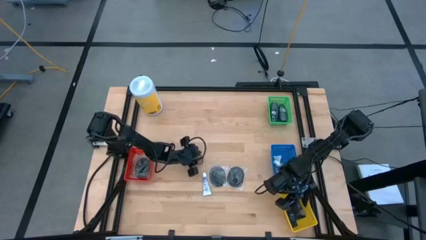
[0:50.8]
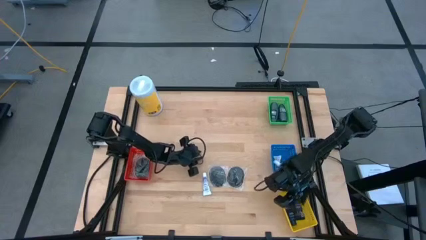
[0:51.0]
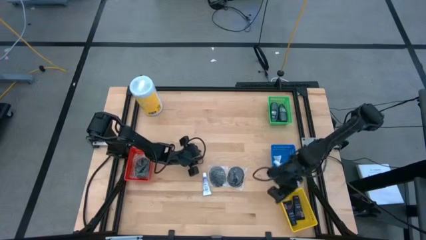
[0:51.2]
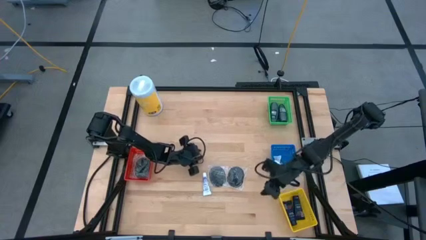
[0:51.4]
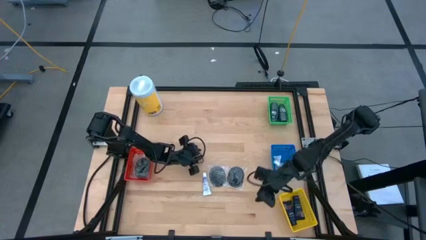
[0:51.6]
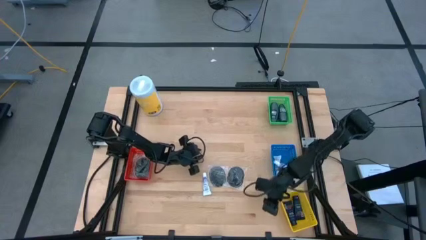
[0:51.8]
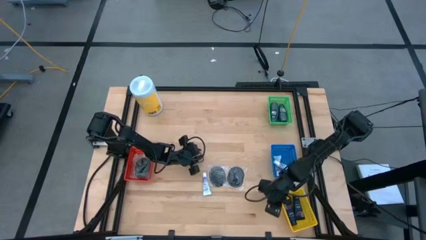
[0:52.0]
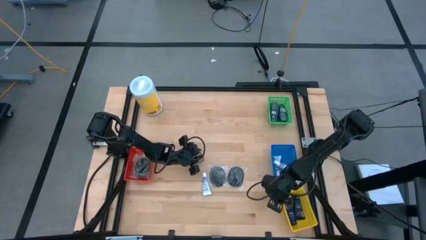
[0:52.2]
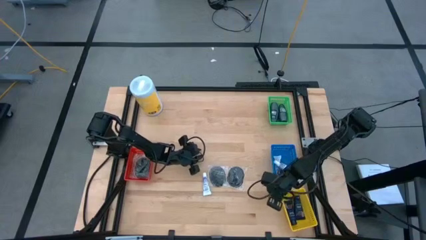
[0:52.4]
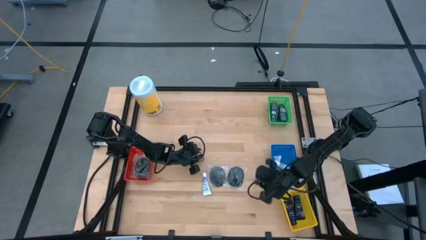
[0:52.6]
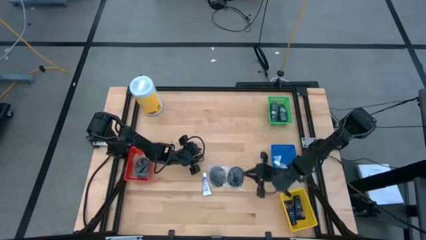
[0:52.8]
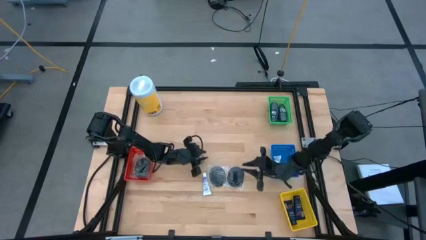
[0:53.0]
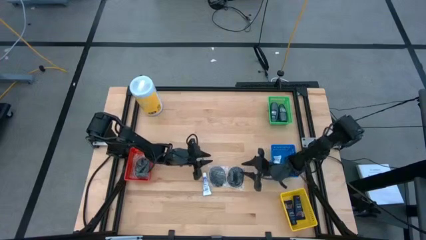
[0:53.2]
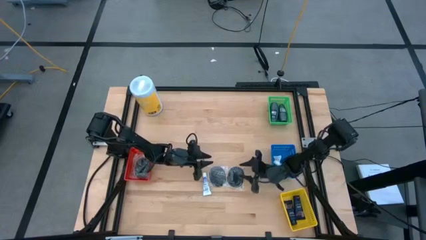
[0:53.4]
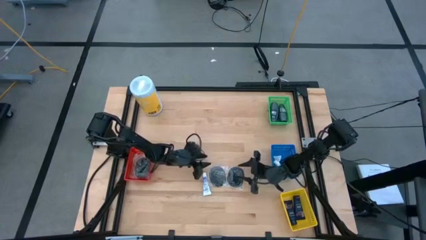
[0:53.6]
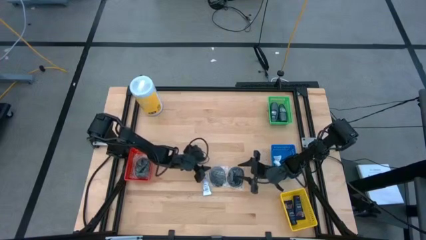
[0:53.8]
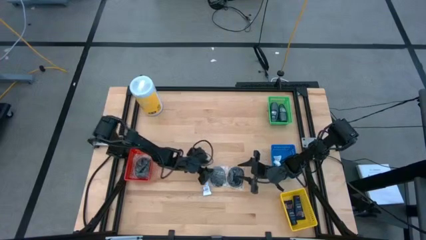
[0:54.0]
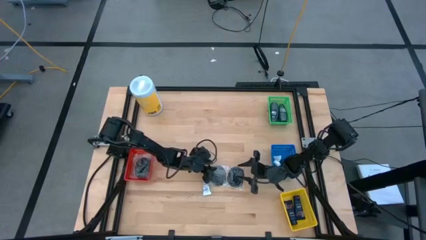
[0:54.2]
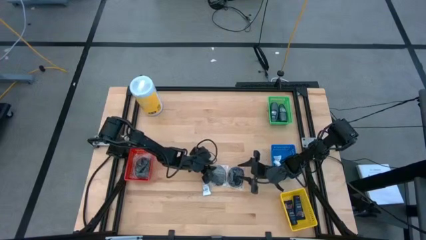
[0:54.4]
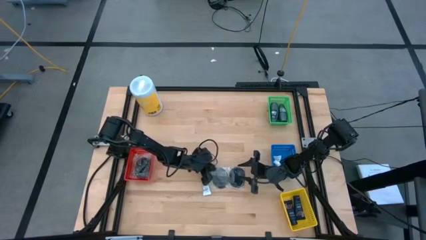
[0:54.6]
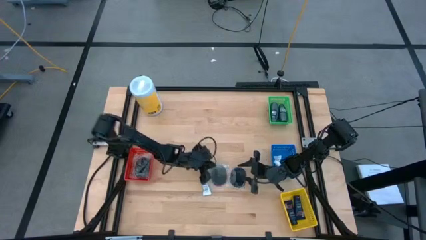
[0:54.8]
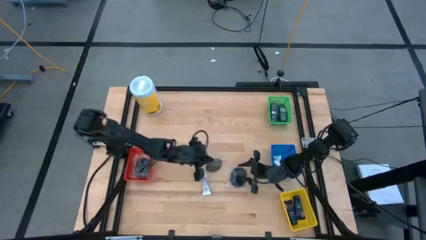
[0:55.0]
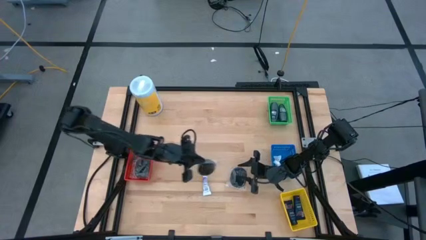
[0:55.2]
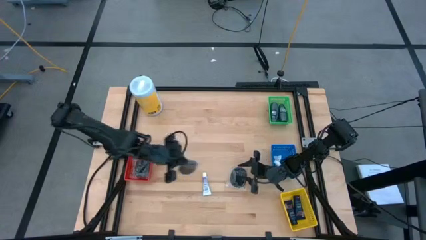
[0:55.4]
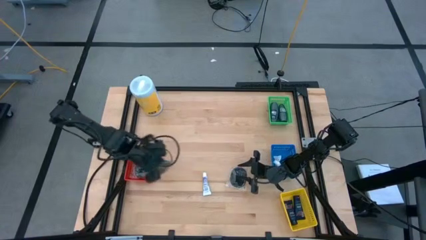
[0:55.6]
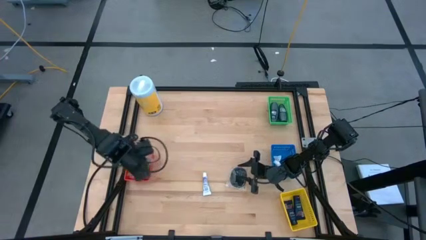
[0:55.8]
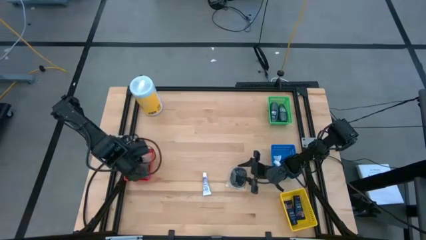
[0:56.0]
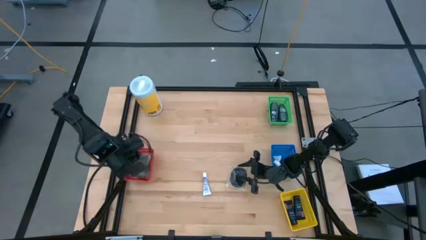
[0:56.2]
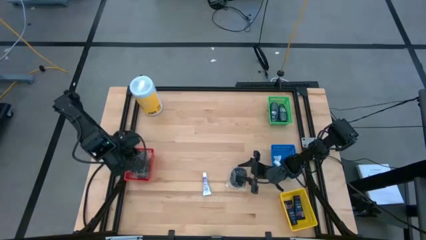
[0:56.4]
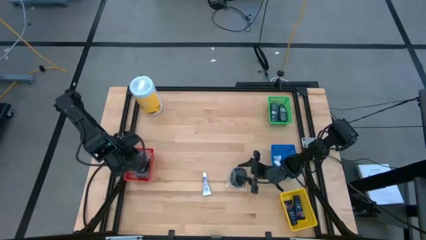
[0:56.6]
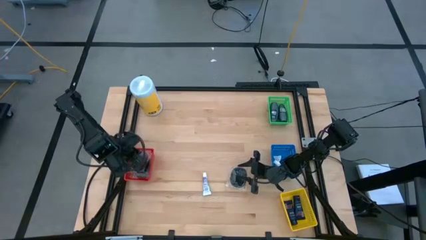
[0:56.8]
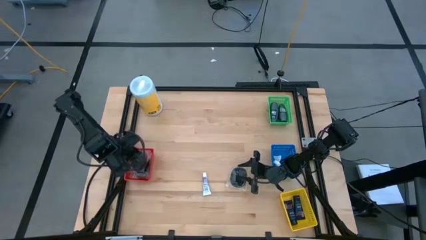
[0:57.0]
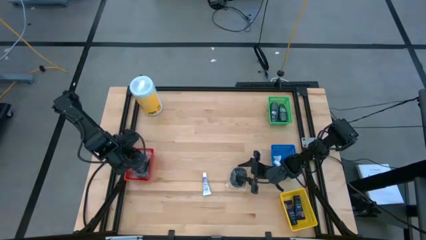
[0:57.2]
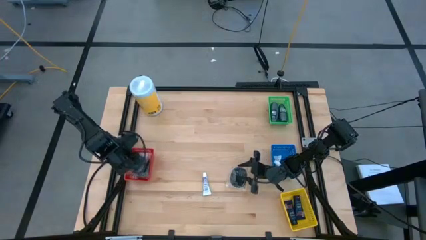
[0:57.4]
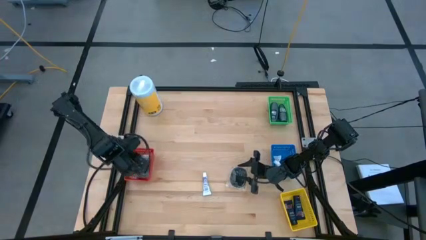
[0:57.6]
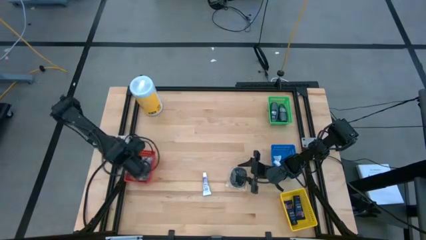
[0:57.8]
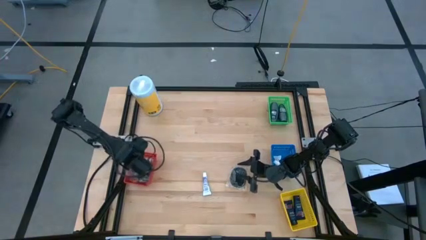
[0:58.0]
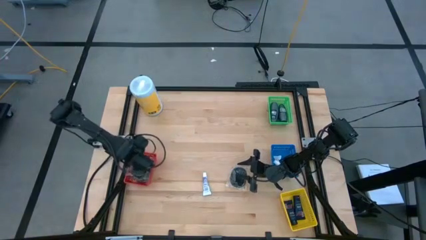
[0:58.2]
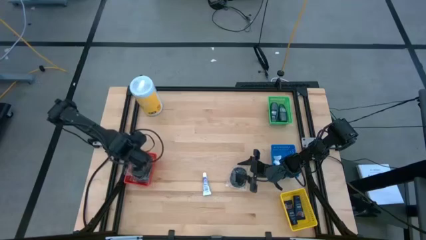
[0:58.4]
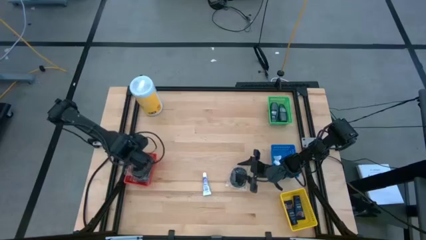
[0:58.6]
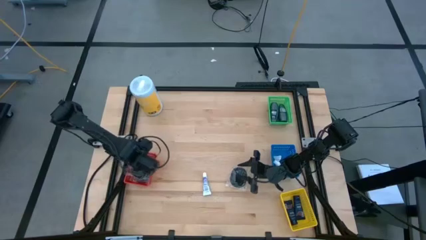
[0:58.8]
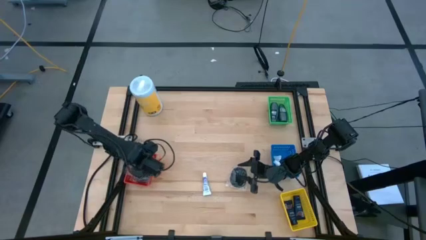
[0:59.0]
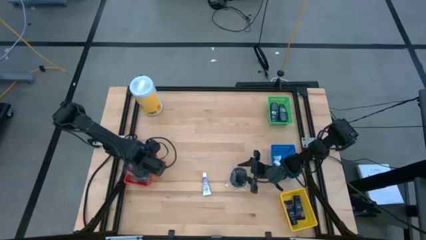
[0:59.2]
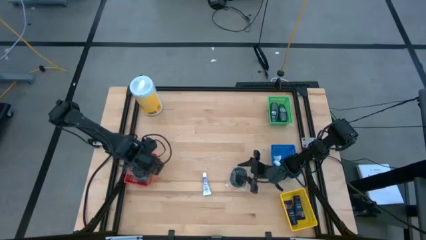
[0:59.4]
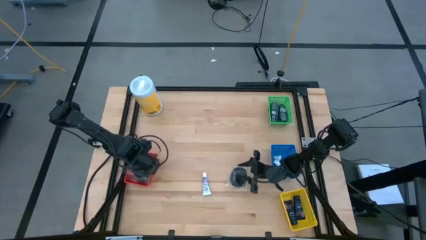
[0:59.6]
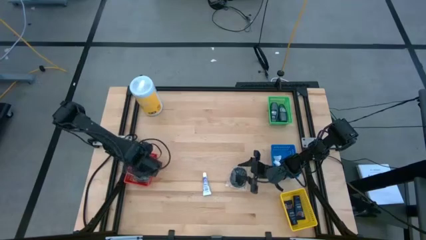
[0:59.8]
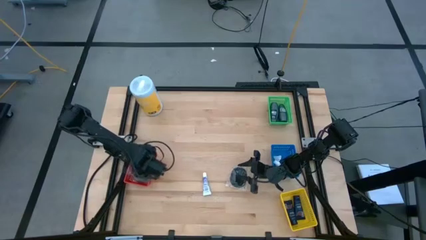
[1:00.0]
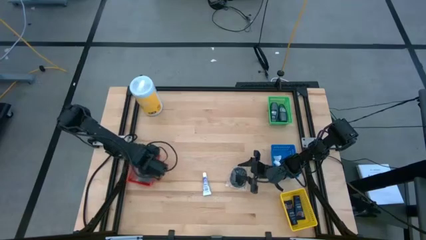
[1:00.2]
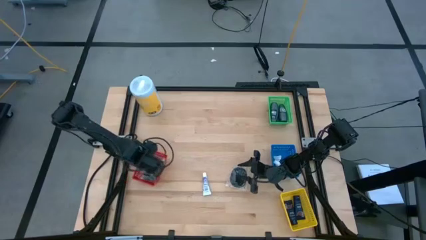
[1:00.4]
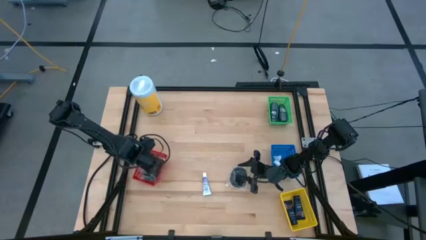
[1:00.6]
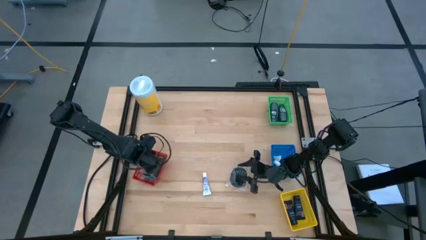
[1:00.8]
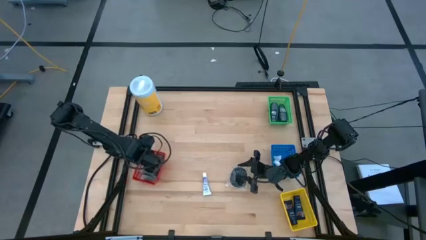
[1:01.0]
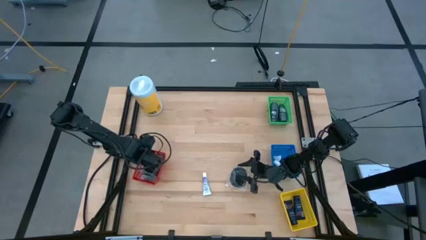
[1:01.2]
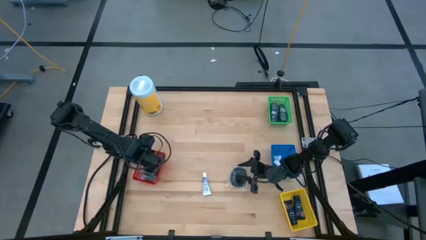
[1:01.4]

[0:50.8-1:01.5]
Task: Pick & Place Travel size toiletries
Put the hair comb into the red bin

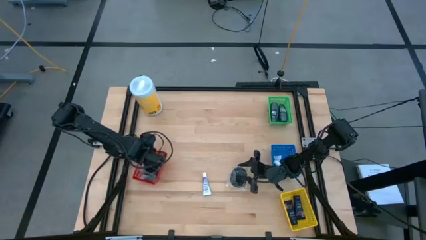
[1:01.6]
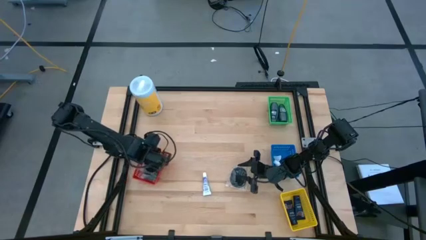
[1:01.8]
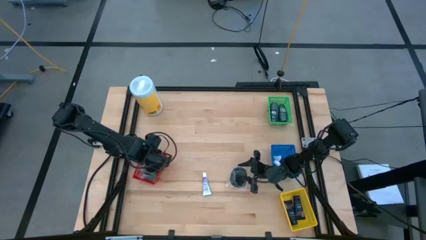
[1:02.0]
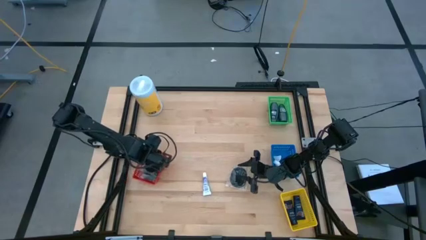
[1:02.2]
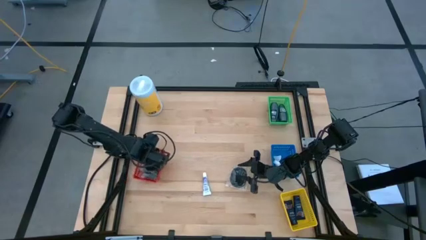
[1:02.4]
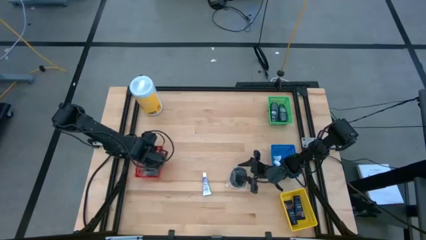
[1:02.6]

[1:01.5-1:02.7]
Adjust the red bin

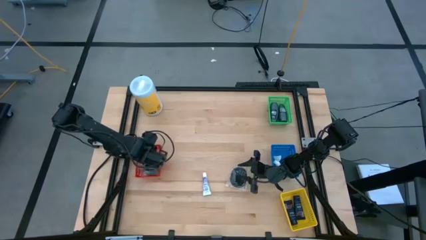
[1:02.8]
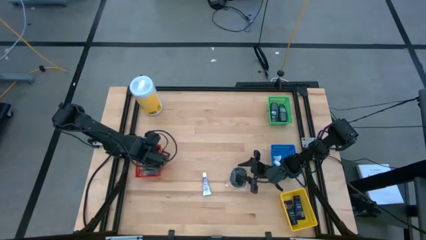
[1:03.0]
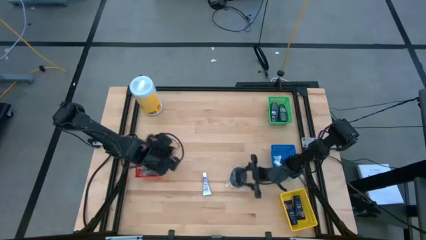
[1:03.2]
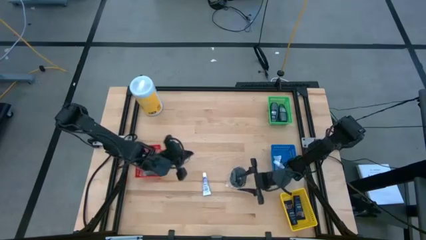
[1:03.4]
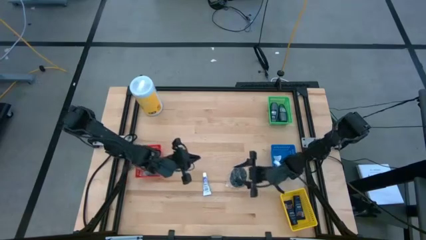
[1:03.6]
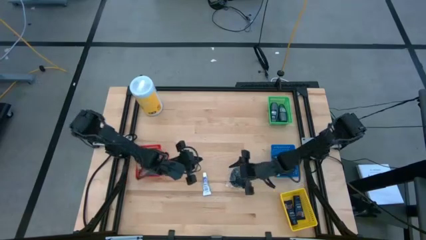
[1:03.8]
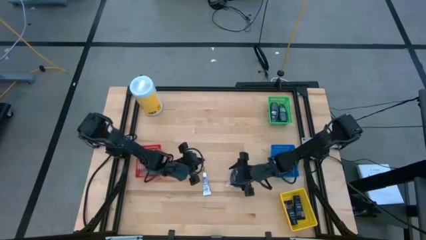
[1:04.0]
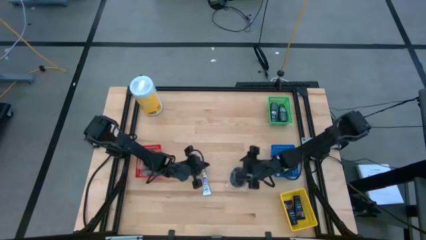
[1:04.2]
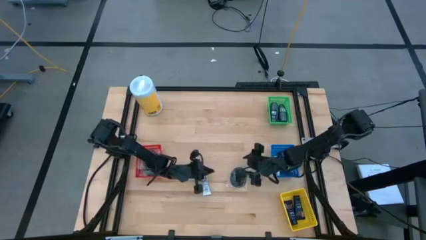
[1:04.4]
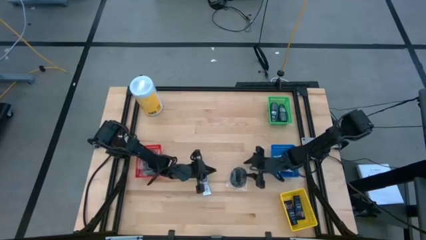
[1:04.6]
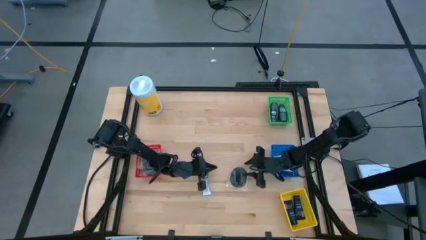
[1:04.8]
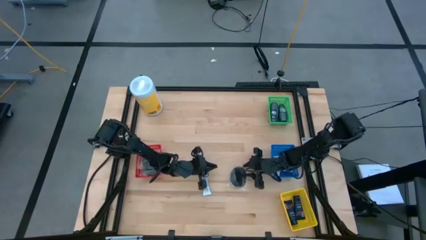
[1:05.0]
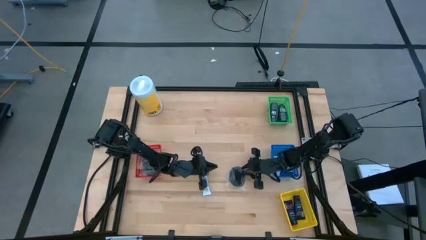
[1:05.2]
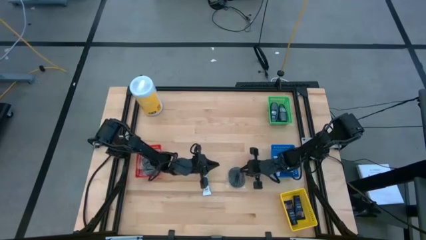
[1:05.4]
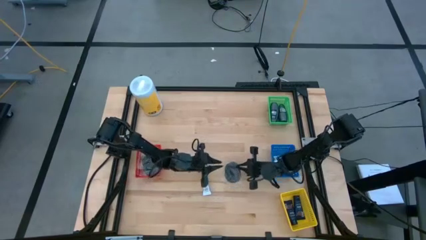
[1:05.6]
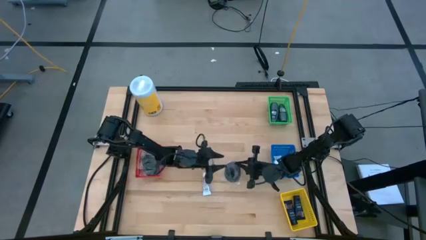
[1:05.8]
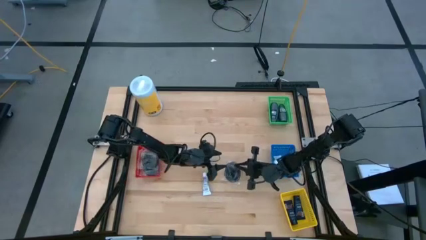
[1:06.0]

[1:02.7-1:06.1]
Put the hair comb into the red bin
